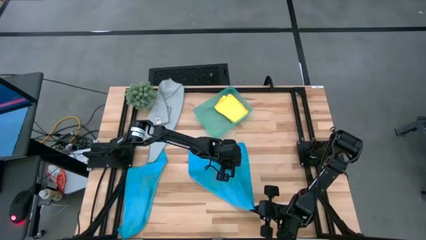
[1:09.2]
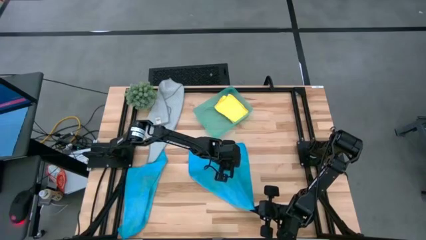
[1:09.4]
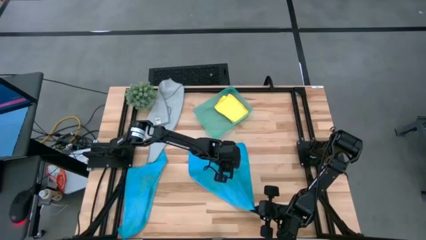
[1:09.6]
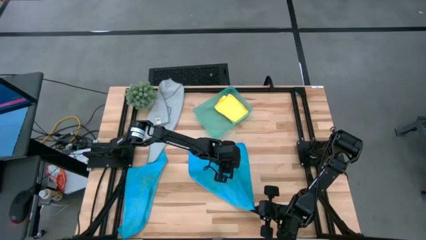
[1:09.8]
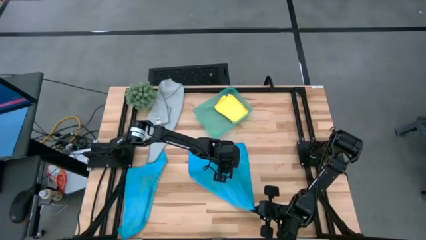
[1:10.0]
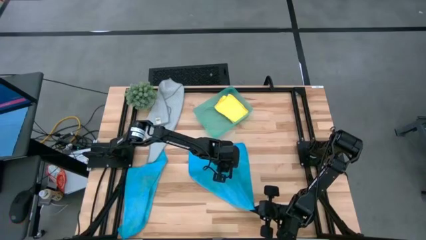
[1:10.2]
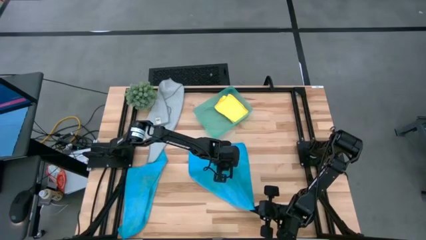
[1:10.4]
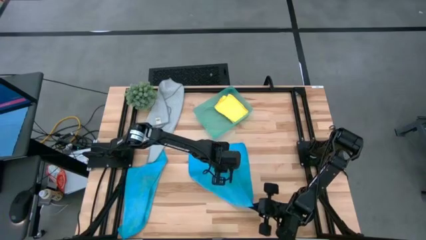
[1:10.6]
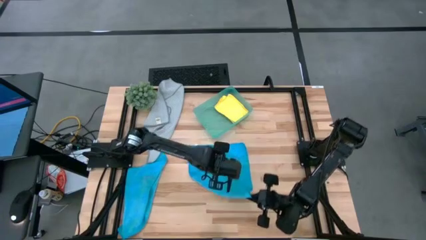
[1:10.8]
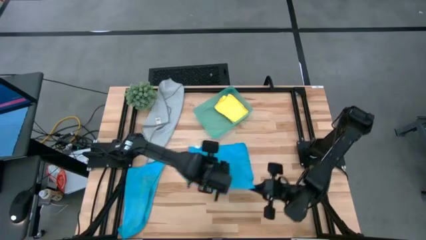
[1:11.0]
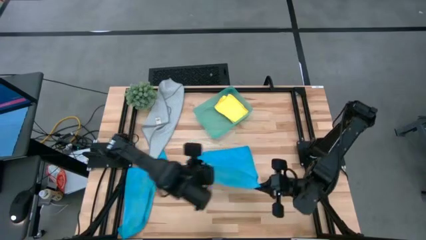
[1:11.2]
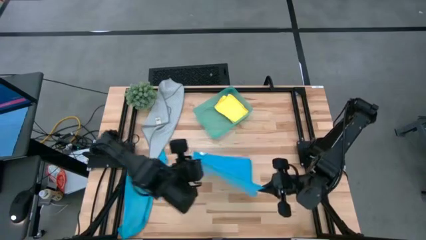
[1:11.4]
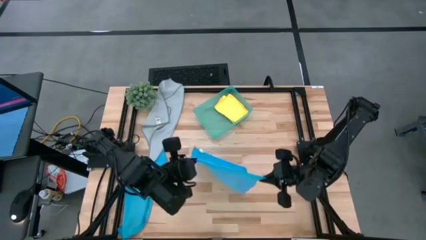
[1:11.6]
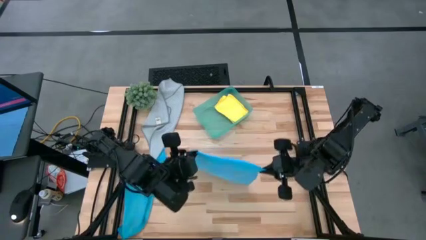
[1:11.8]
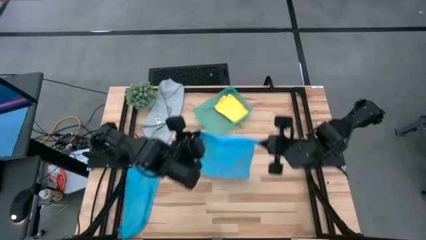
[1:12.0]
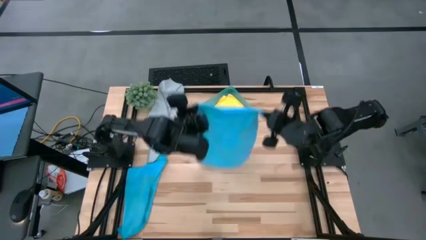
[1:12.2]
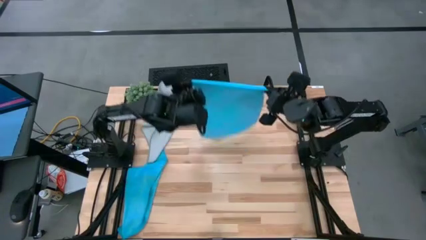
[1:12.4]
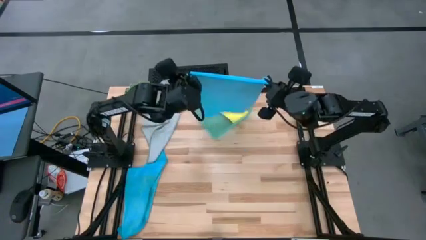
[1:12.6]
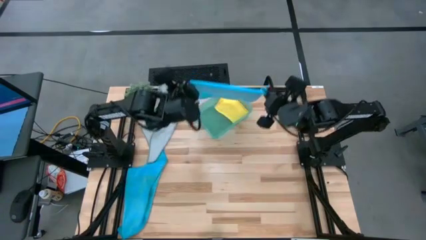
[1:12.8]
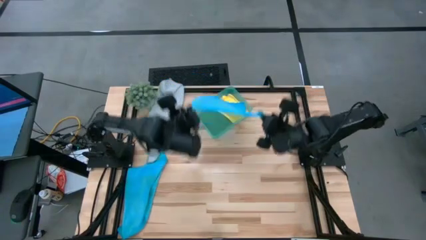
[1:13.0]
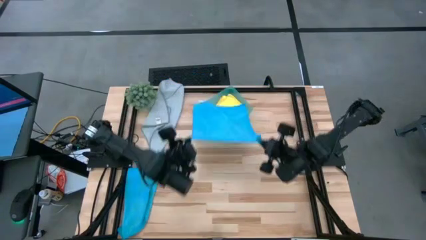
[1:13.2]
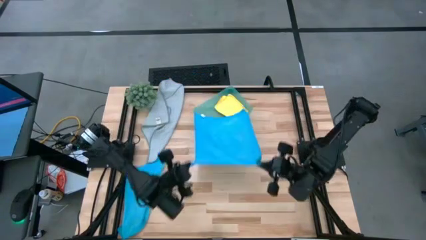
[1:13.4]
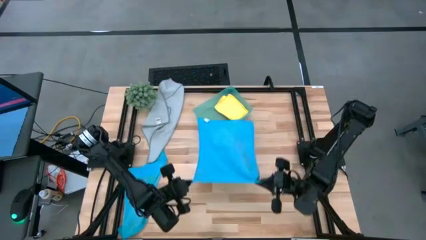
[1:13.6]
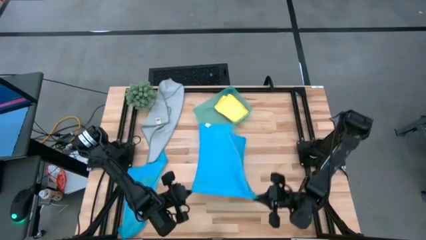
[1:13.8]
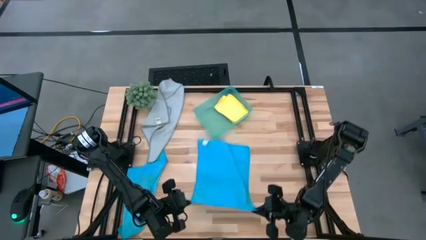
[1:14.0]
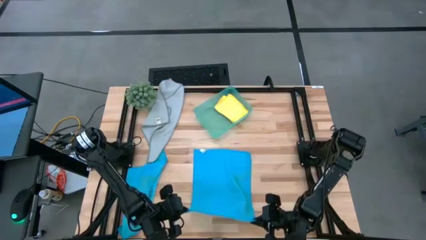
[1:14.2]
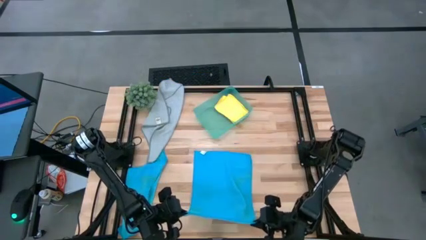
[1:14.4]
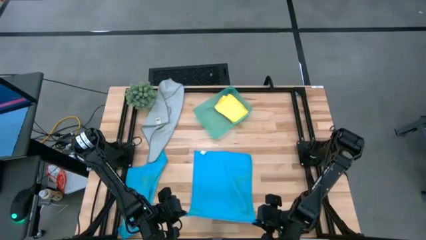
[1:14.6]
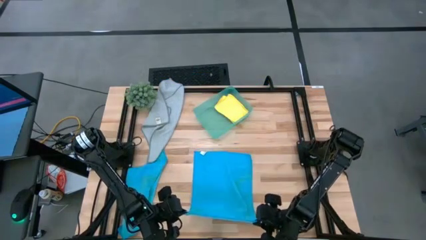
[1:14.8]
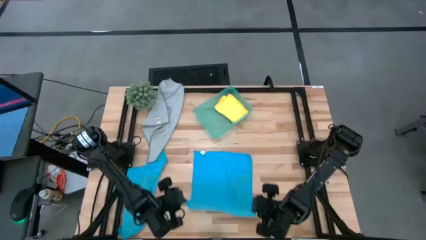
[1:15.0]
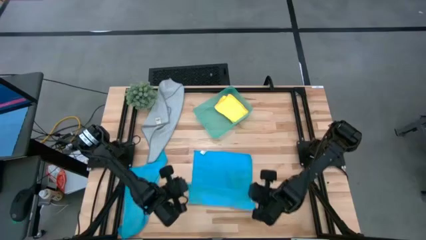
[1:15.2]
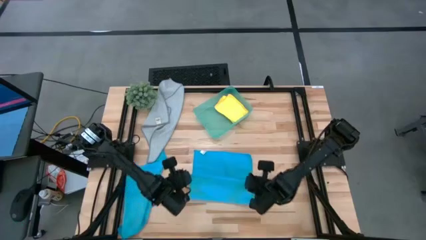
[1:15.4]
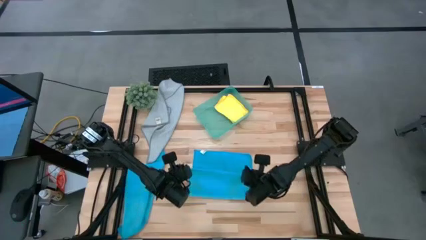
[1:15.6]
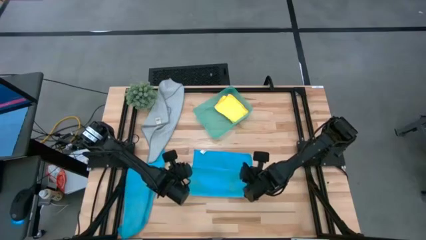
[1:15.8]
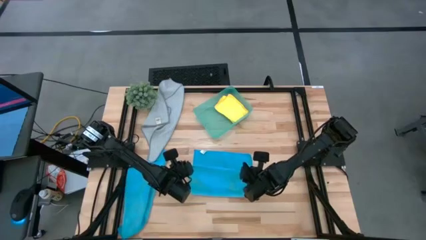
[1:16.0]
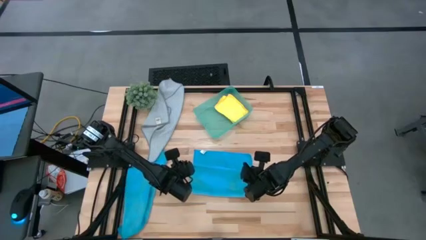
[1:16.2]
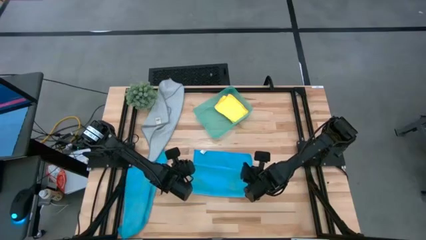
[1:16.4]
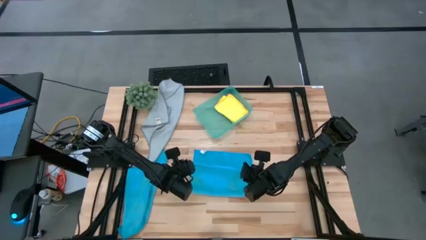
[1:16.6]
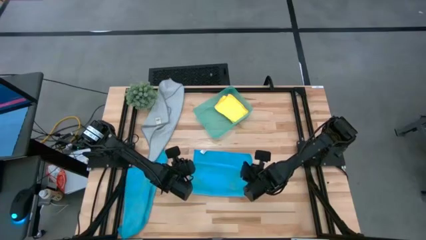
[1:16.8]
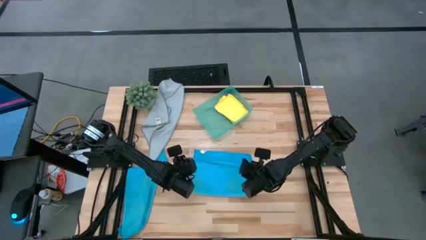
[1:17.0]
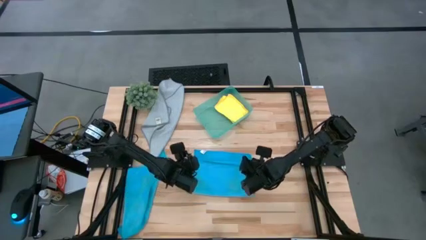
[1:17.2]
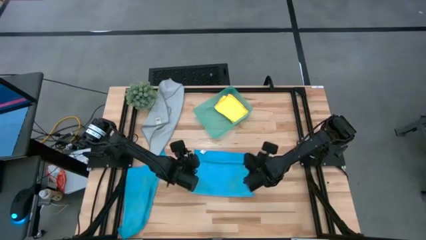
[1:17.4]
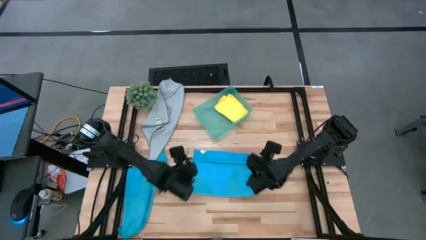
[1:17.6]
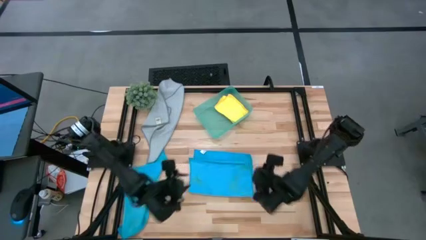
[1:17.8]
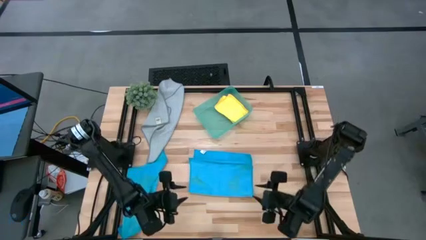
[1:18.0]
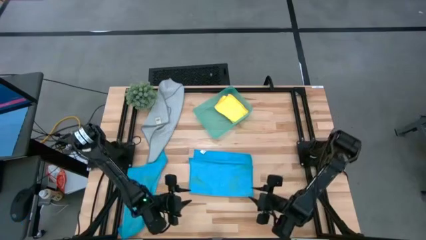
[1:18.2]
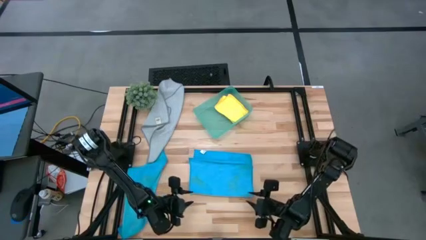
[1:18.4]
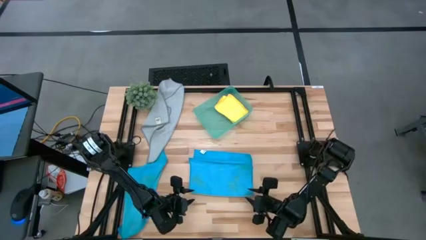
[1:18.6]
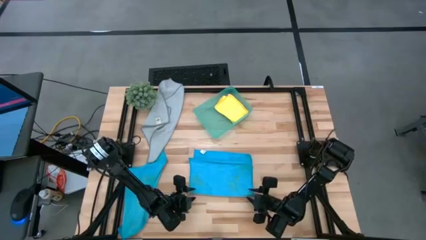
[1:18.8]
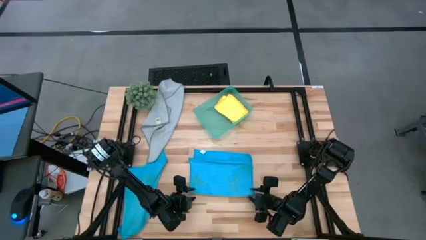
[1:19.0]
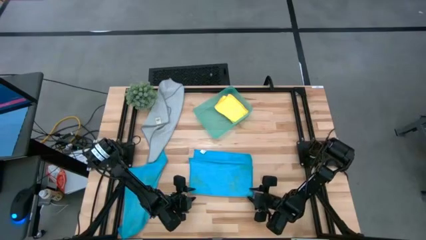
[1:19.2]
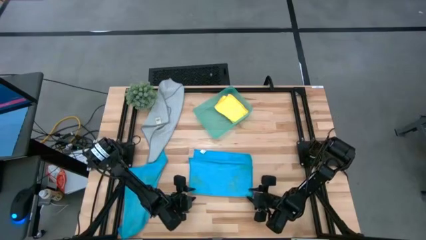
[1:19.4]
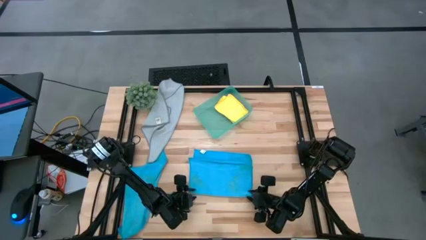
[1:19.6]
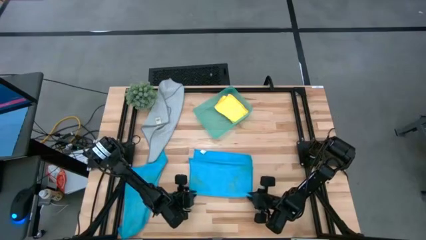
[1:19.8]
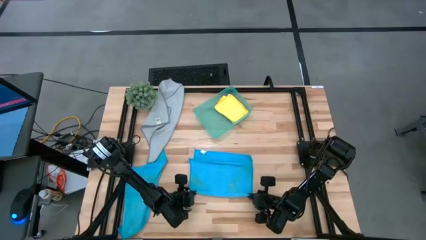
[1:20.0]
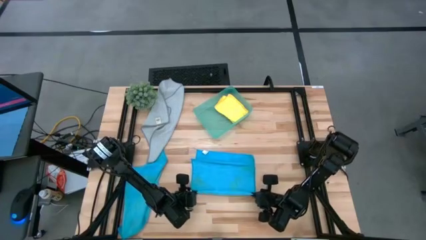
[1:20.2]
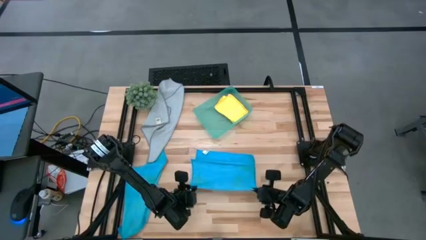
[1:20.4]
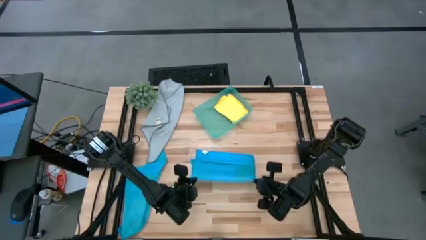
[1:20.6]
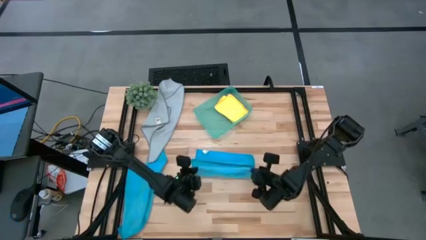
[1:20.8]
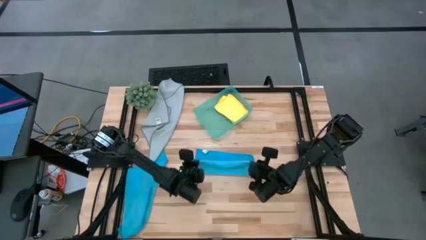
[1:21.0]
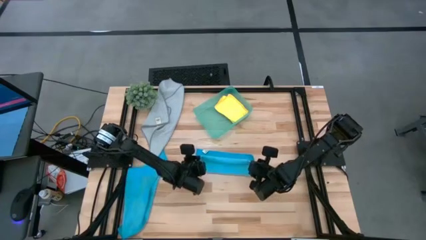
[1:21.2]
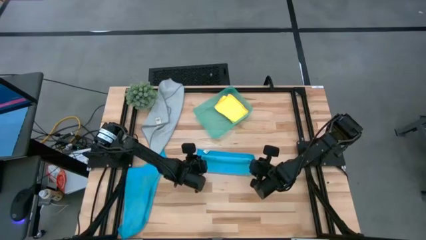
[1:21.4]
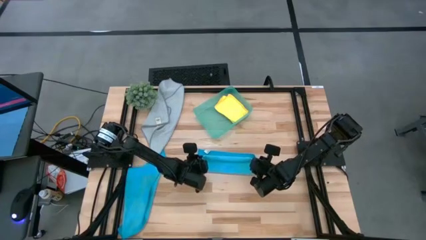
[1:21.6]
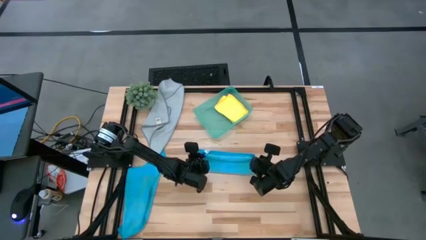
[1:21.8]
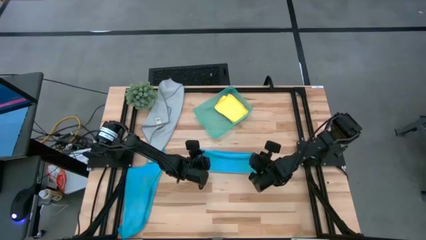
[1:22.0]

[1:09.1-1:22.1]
Task: Fold microfiber towels
Fold the right blue microfiber towel

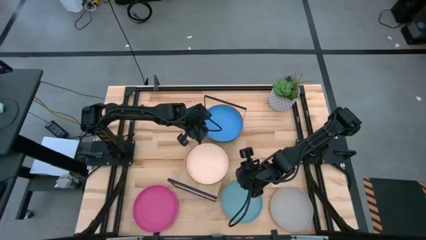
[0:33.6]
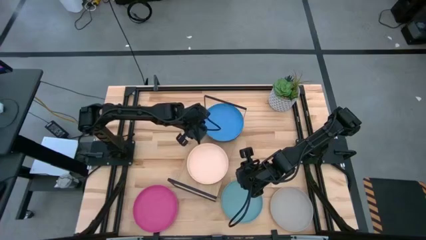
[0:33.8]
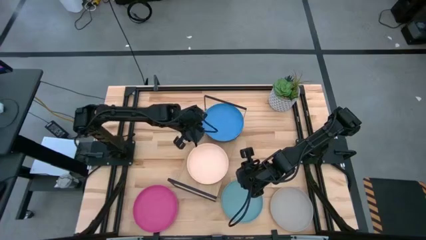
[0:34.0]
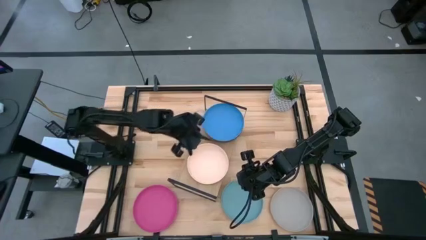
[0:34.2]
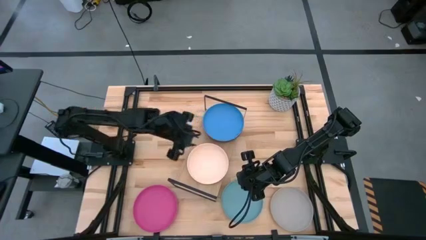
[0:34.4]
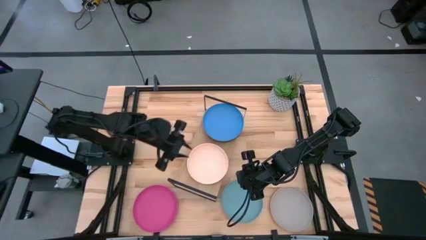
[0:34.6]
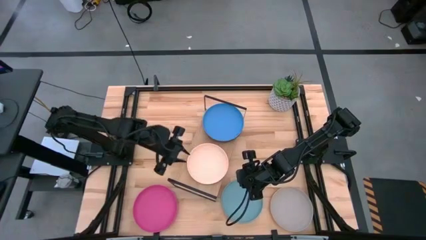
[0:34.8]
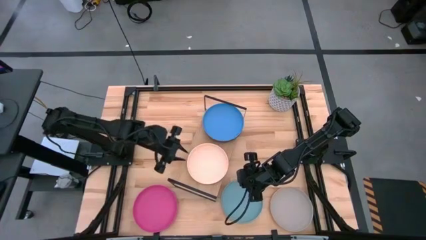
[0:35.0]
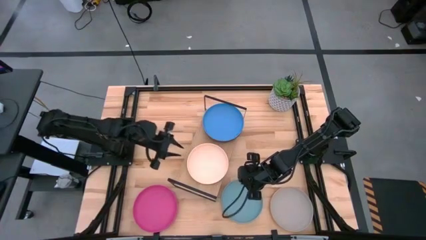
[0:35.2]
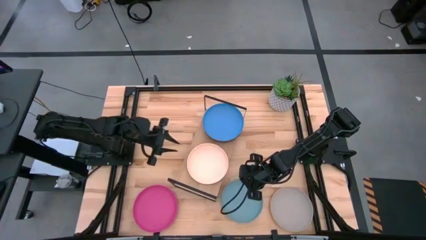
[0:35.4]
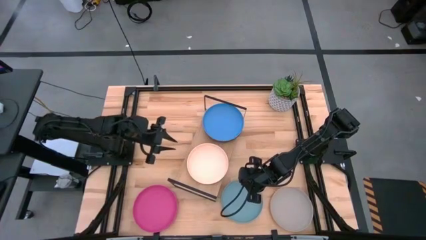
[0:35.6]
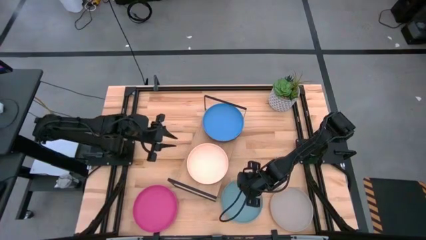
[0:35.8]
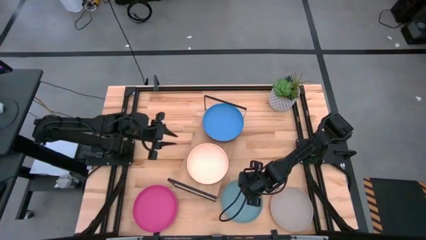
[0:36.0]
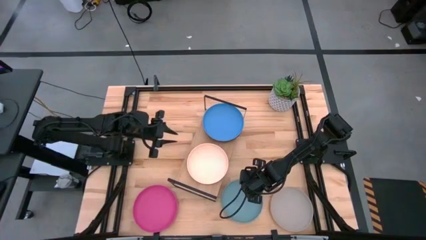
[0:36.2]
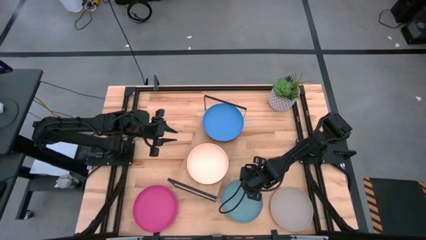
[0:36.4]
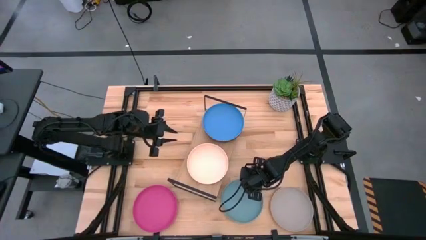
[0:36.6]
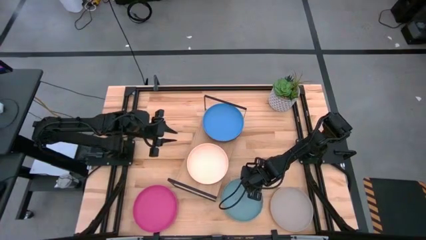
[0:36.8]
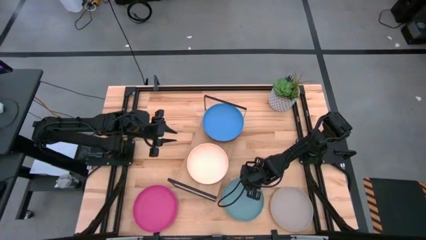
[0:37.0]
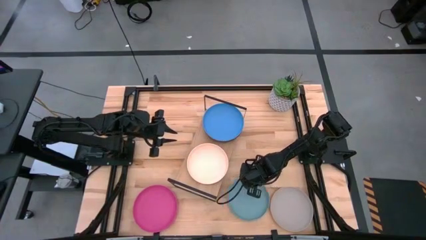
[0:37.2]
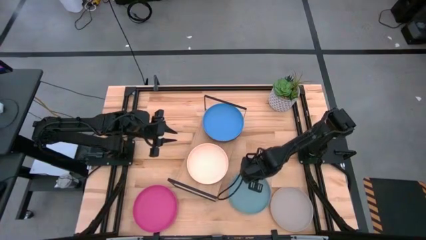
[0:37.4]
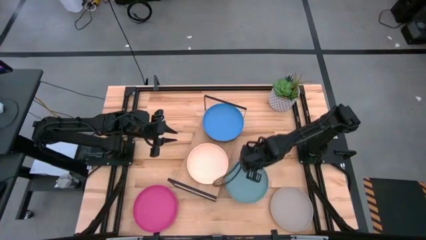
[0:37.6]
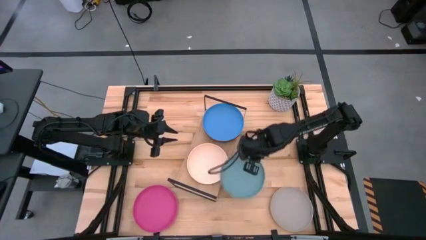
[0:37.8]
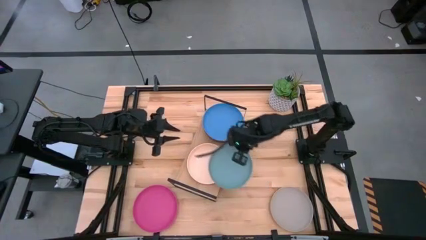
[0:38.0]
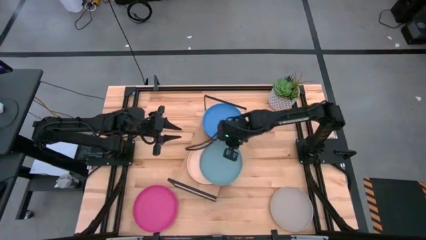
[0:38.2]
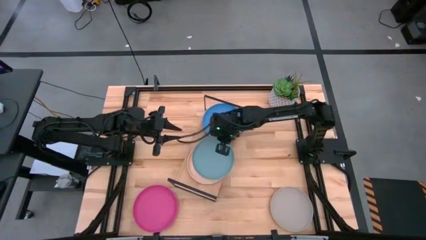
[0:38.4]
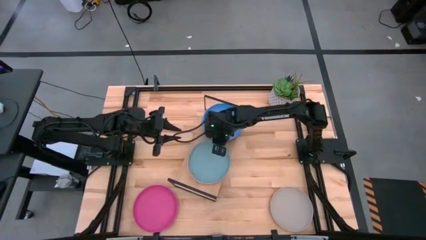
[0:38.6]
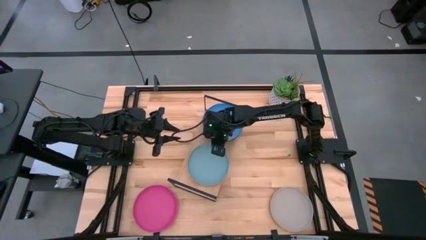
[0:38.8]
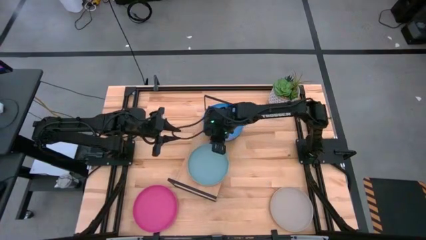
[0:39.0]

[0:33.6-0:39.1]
Task: Place and stack plates onto a shelf
Stack the light blue plate on top of the light orange plate on the shelf
